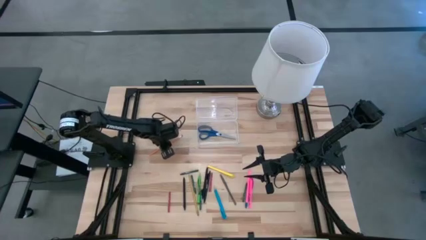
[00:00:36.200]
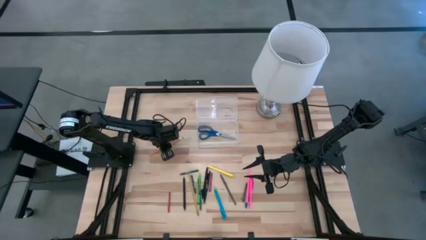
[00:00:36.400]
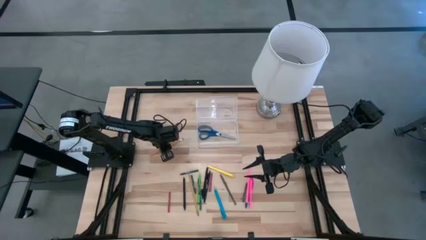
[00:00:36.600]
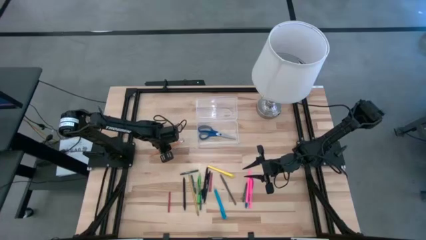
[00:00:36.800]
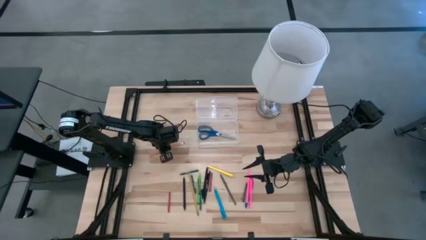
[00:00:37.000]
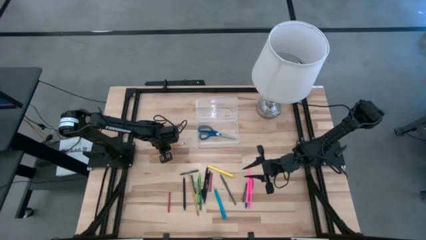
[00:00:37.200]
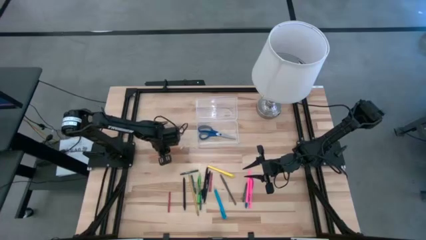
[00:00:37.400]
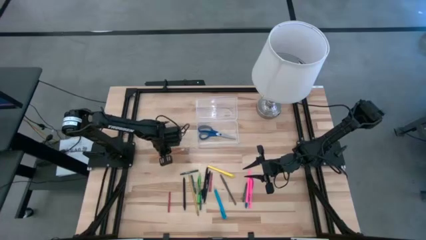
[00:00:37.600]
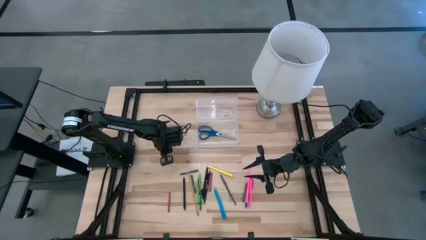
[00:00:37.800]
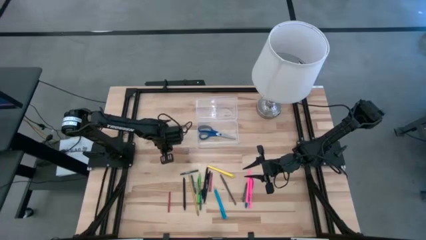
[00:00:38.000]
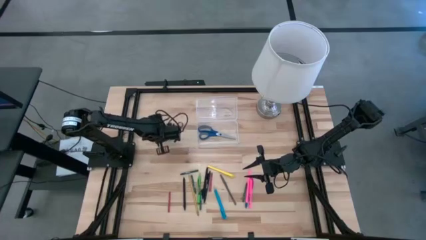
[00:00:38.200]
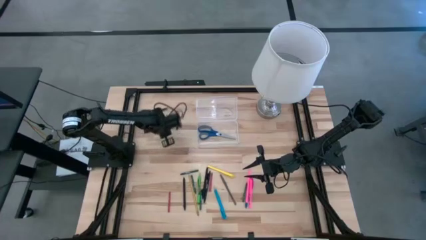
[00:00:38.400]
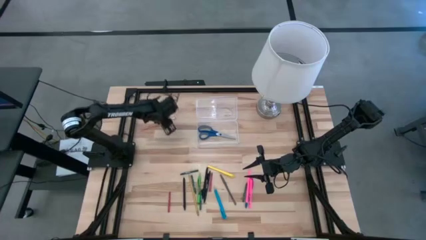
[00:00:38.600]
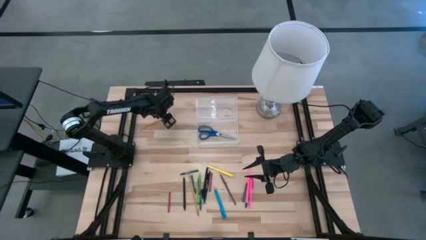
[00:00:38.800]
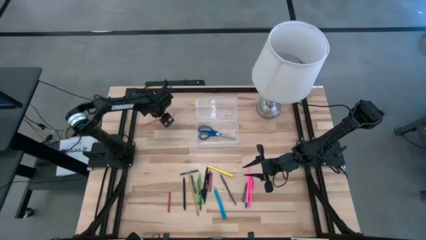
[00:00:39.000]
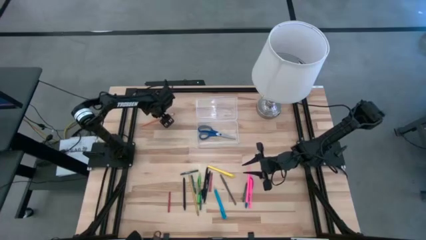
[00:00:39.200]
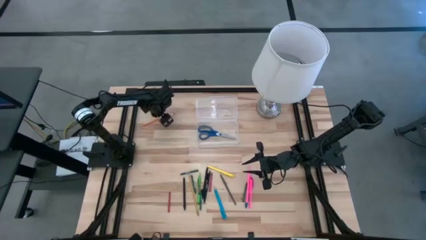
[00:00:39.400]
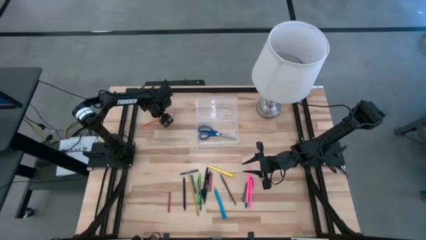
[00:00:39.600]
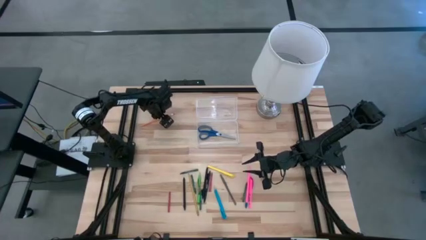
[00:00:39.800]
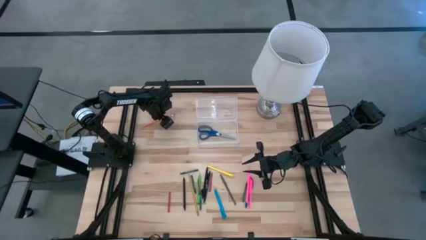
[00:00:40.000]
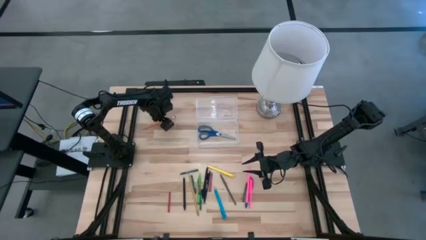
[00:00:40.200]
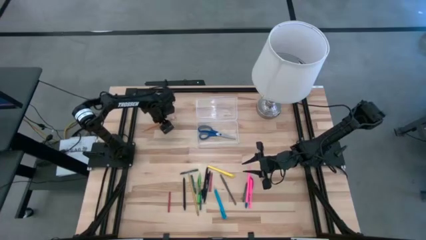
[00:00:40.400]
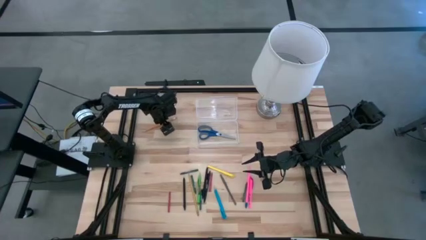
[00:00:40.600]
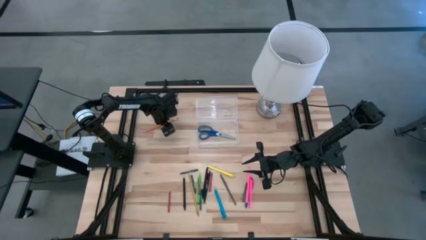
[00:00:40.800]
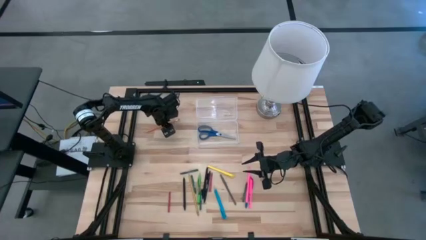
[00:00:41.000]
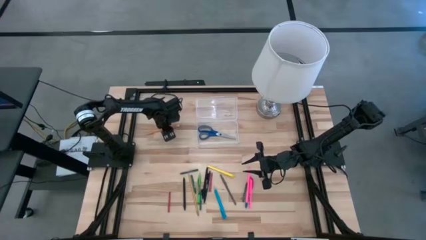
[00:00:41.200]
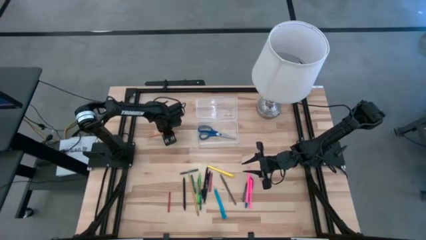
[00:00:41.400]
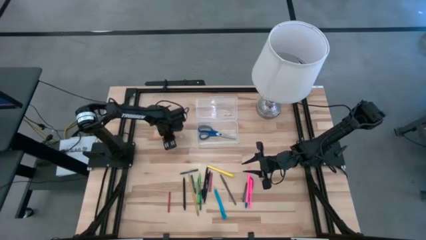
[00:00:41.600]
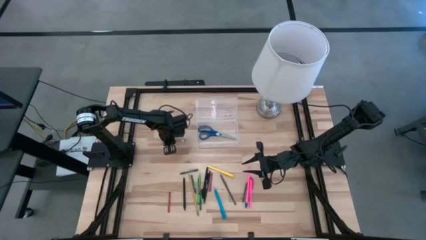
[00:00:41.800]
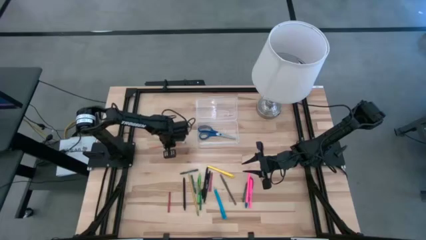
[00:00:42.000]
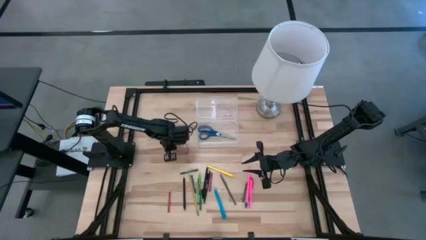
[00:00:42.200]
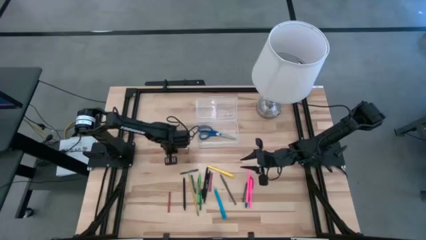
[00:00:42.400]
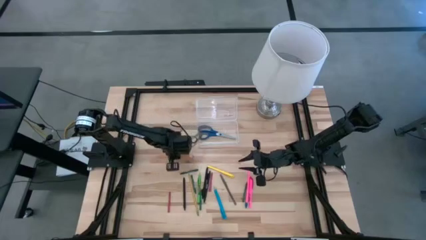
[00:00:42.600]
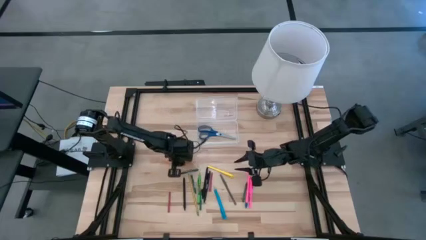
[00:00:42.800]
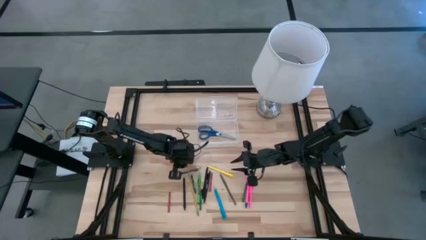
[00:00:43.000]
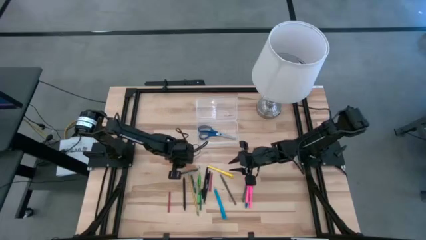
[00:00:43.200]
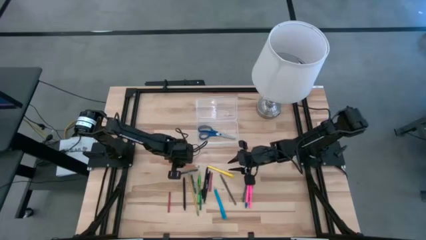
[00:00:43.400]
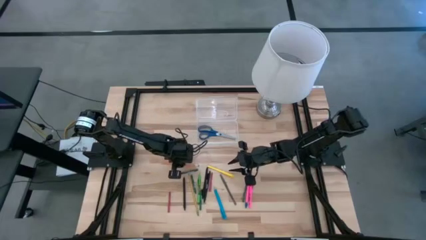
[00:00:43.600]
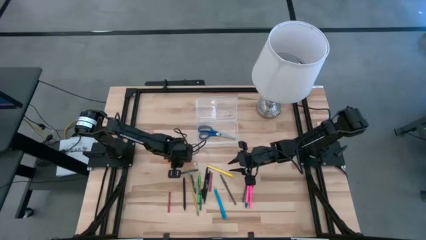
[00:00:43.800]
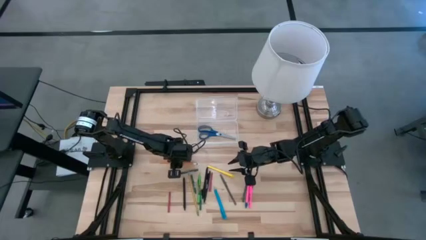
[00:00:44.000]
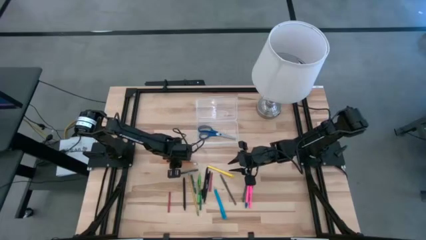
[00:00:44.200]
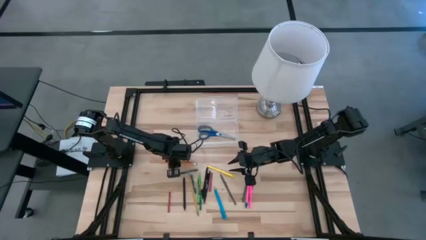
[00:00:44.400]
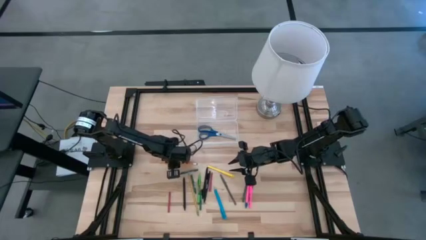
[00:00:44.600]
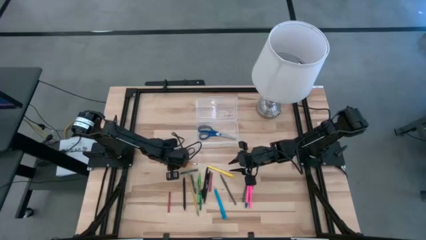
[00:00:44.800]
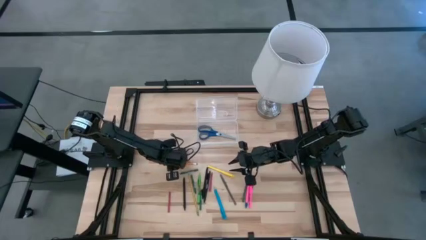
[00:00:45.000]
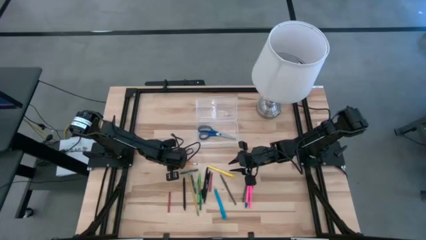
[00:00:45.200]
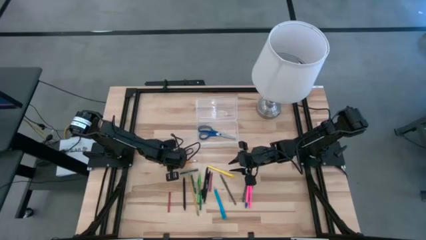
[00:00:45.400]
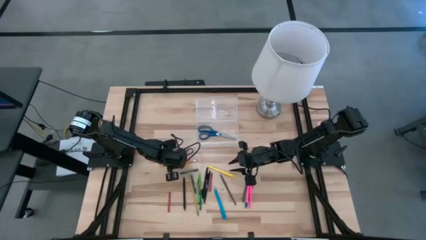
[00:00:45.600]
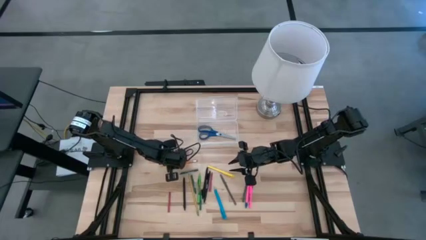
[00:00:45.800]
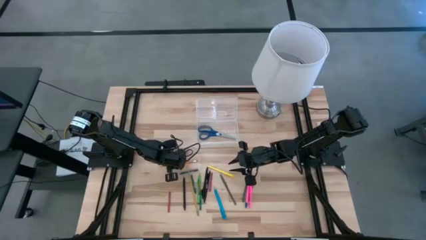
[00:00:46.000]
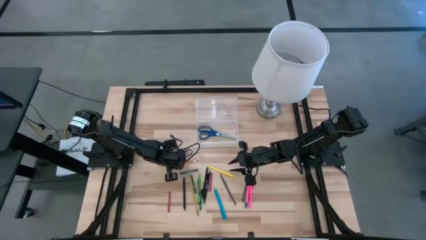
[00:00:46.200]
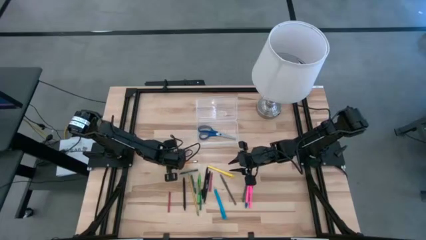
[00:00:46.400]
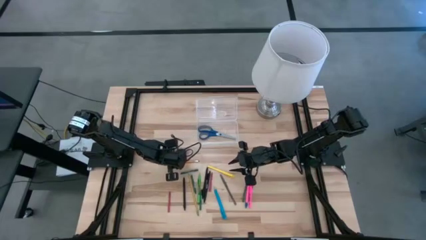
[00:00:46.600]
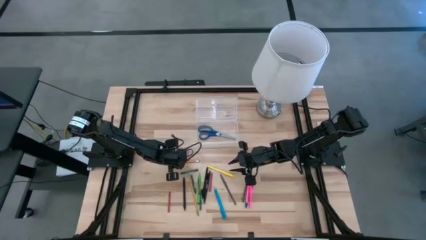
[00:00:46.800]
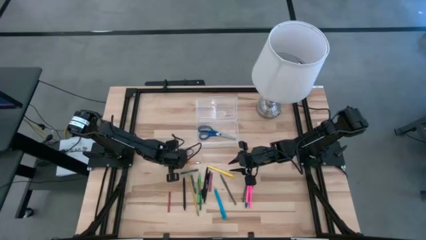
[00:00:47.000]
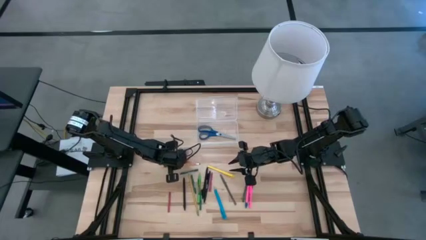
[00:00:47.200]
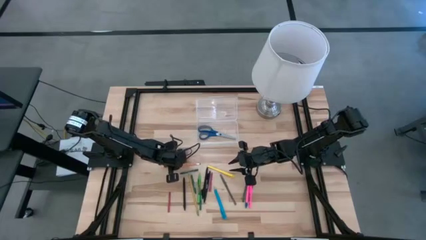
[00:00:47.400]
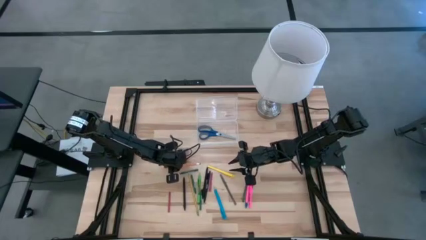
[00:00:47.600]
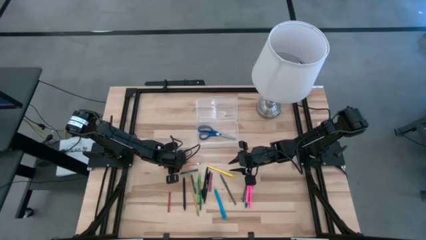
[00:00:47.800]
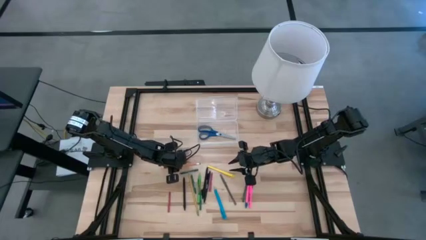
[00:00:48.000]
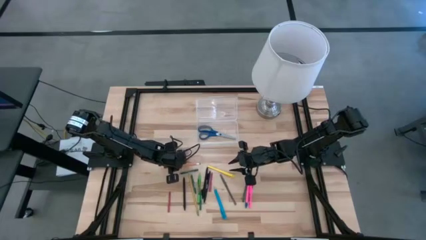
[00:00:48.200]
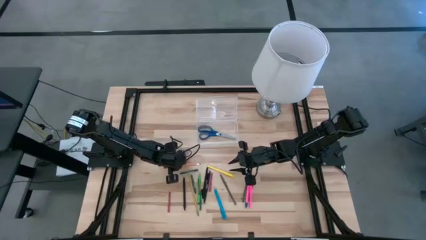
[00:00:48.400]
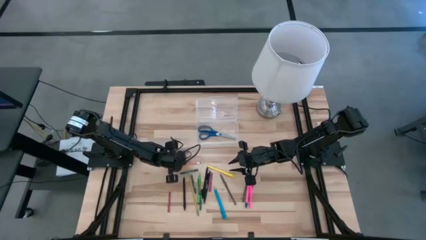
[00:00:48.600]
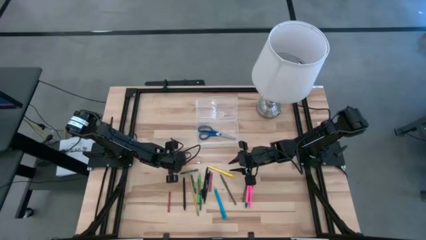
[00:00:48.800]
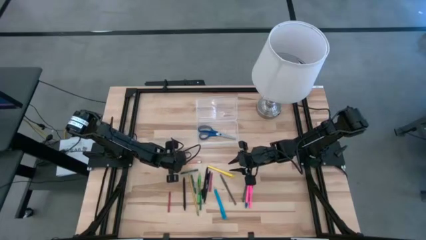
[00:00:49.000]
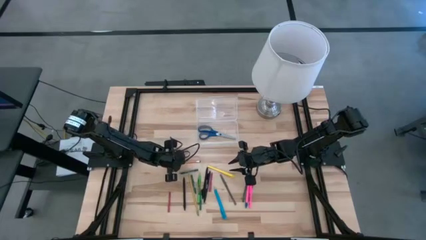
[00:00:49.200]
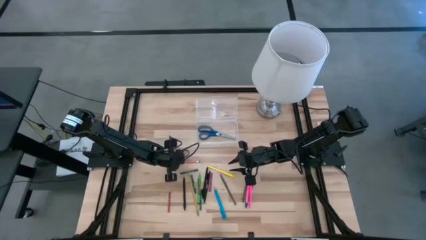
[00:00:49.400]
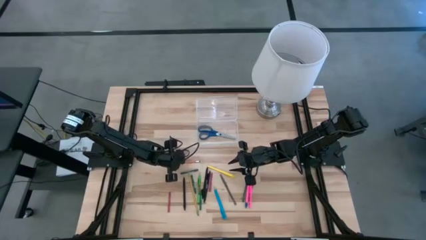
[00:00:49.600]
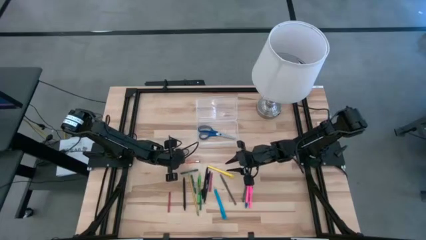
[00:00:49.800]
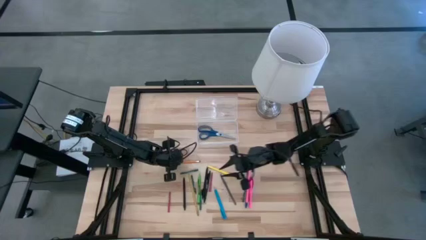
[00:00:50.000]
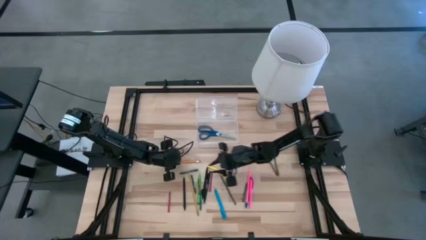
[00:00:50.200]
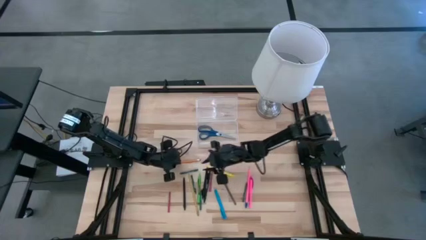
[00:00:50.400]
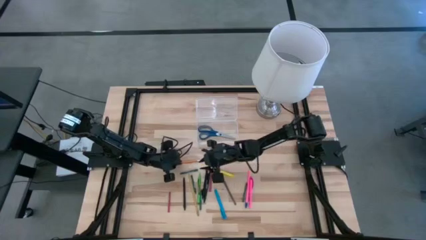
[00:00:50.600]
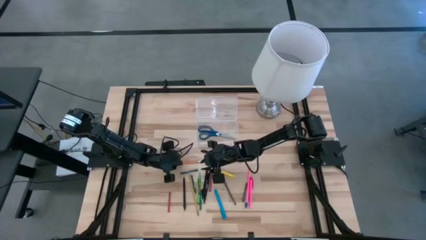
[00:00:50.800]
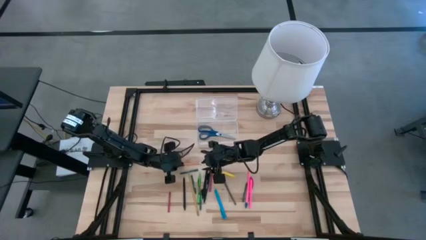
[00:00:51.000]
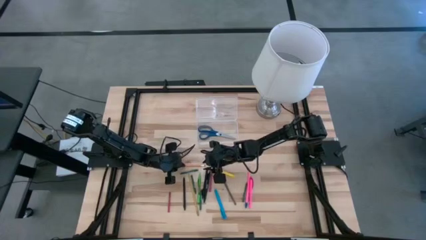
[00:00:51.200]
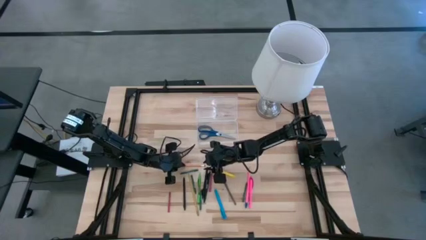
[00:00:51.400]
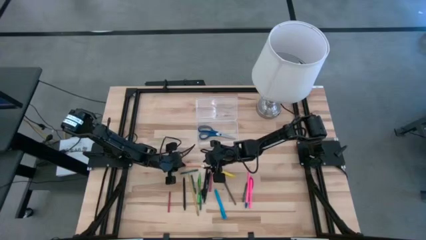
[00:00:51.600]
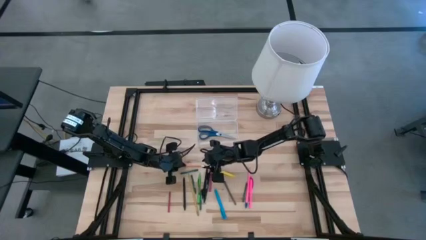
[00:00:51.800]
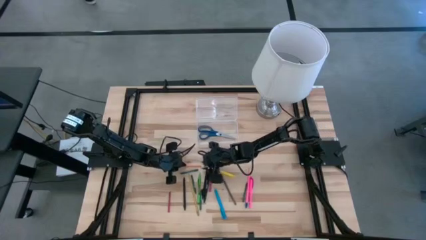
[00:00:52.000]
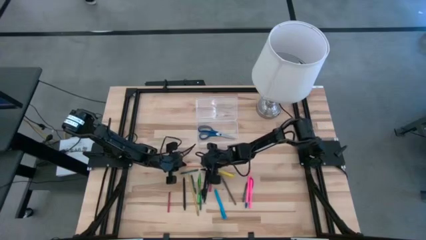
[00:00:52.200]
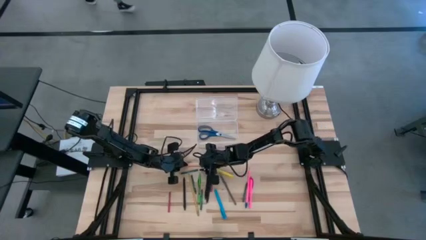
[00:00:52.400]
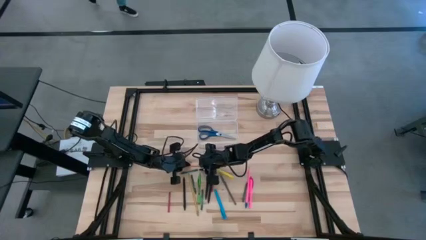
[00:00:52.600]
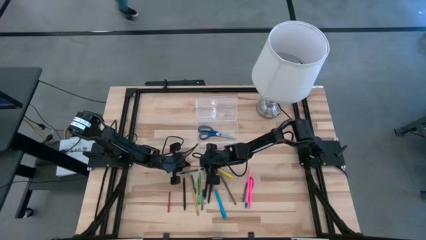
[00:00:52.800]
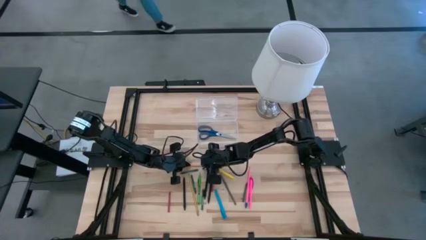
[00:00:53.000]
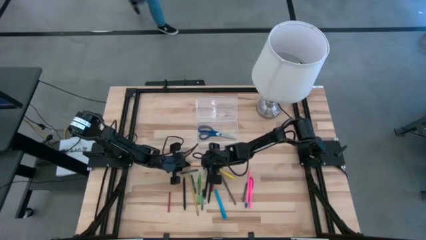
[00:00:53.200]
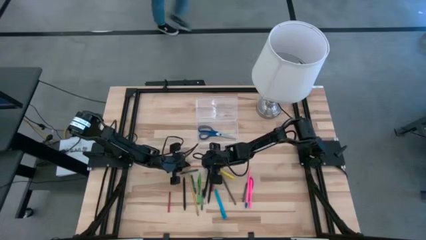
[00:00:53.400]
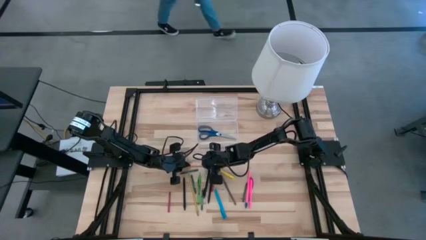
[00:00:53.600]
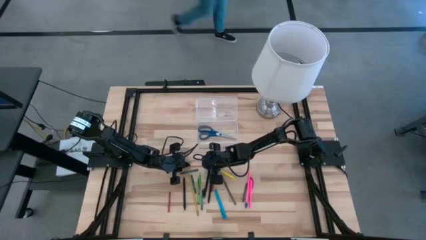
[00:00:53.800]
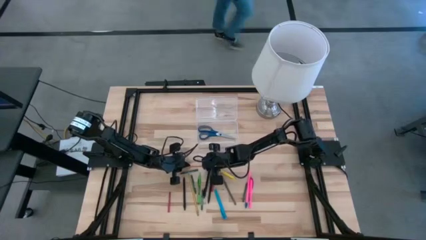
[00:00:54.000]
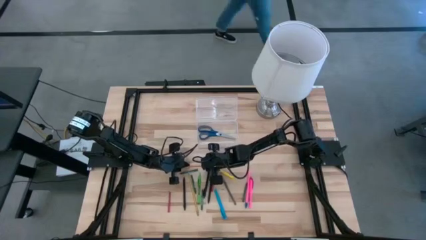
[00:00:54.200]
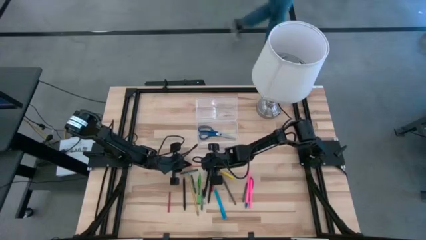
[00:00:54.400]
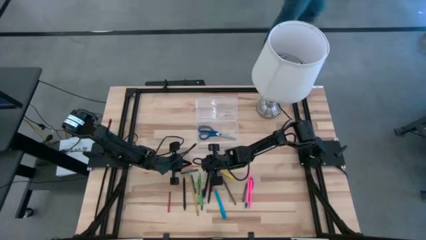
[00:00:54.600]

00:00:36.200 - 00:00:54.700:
Task: Pick & place school supplies into a supply box
Put the orange pencil into the supply box
